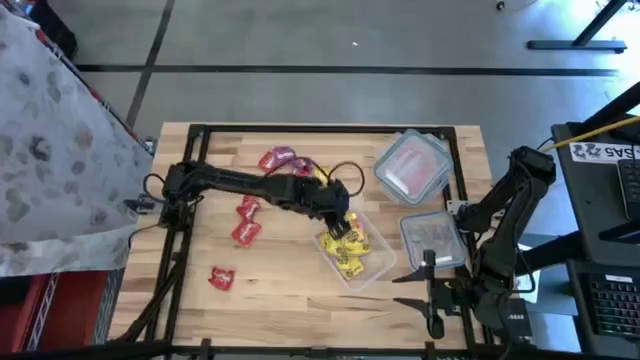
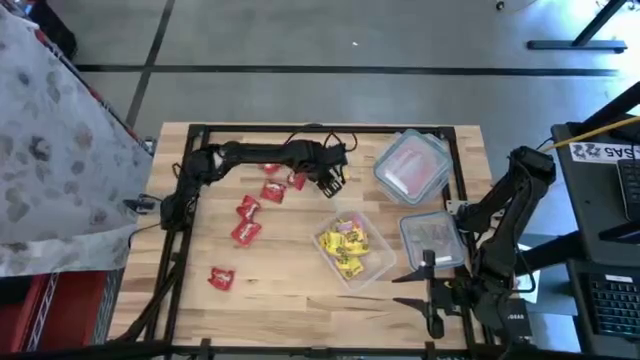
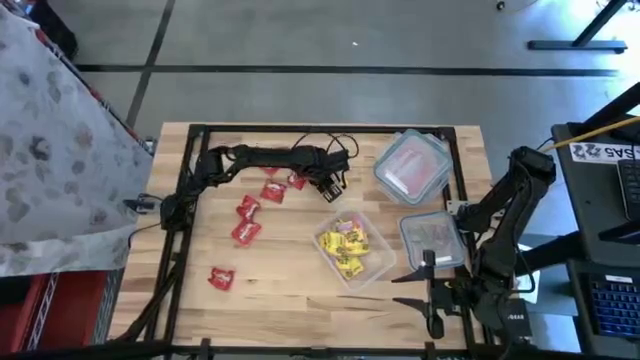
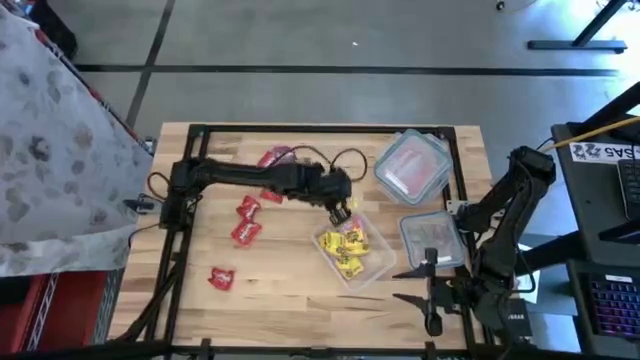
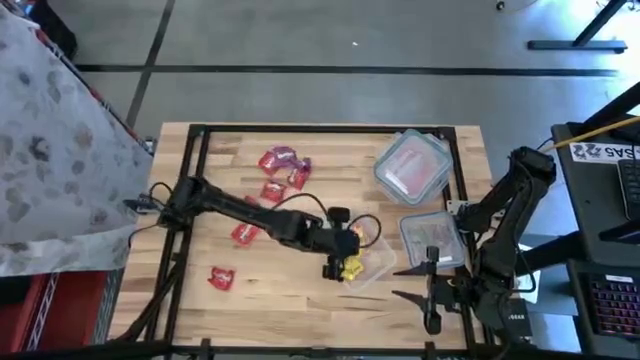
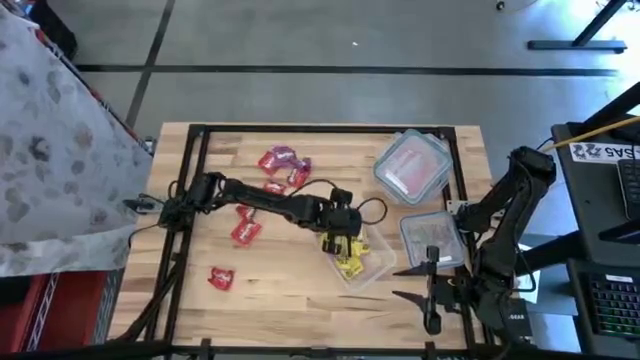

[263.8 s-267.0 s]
Task: Sort candy
Put the yellow candy into the rectangular transparent food container

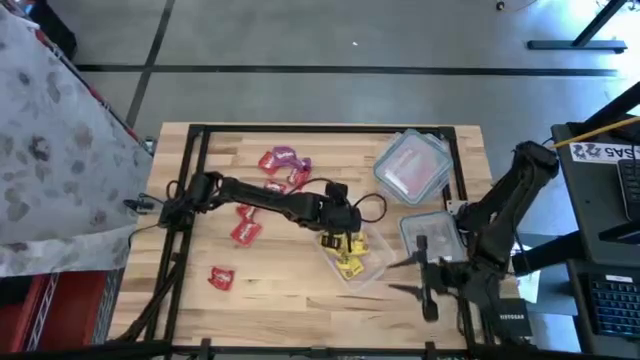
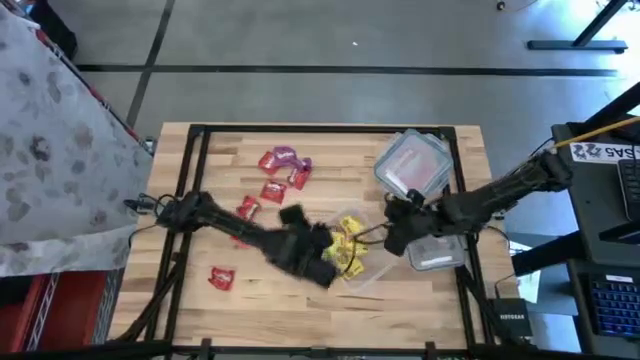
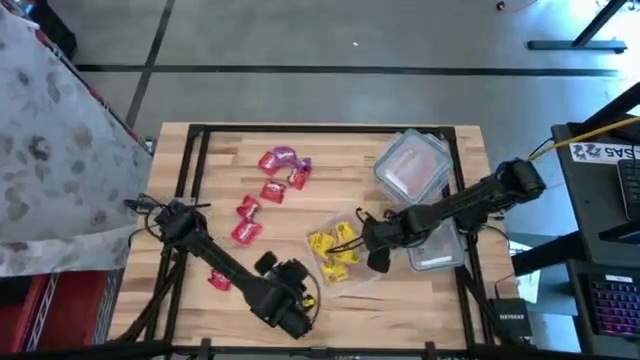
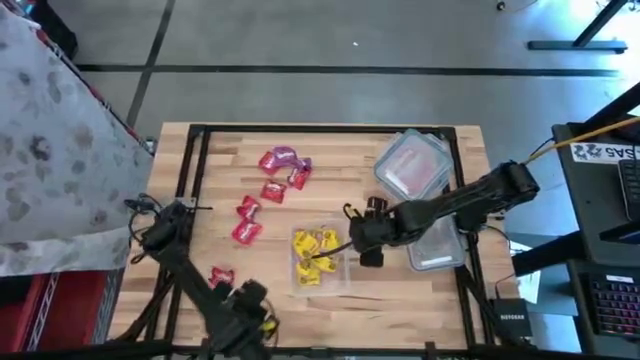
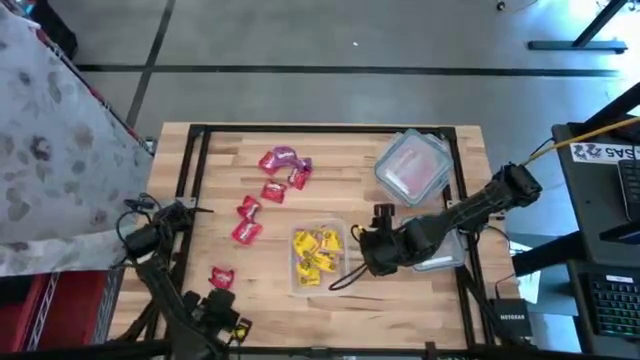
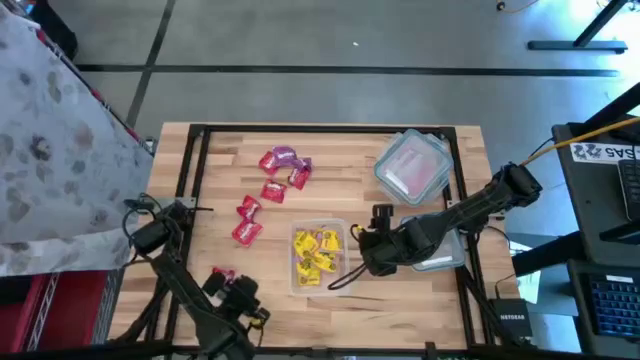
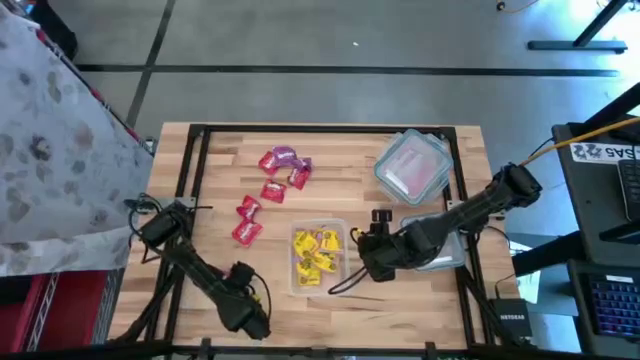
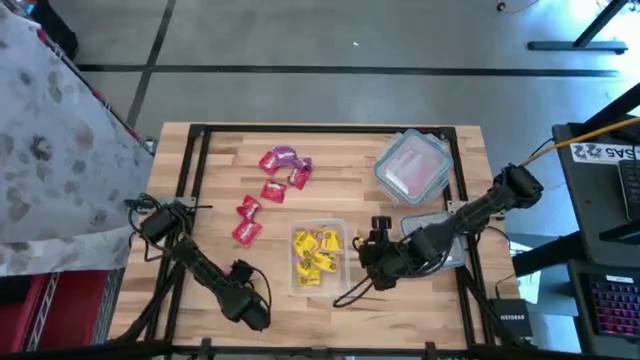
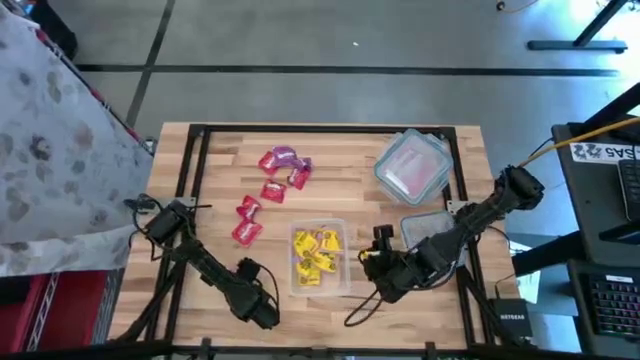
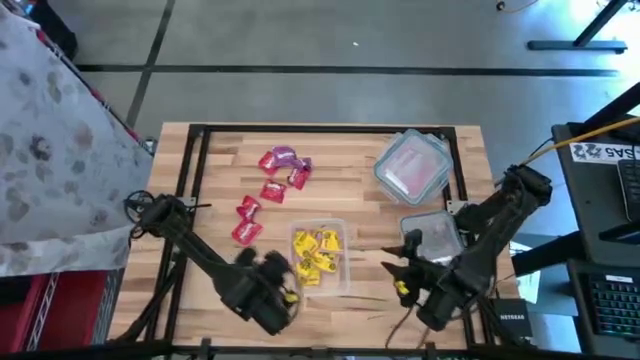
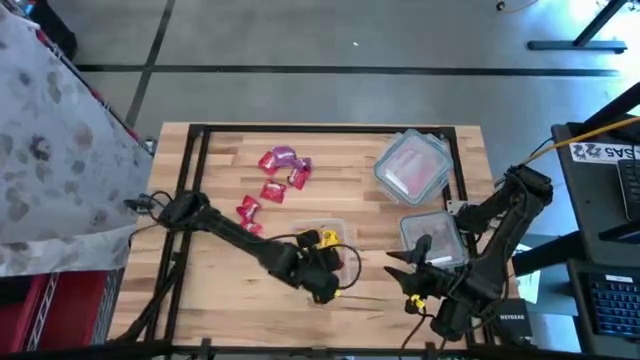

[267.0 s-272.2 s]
Put the red candy into the rectangular transparent food container

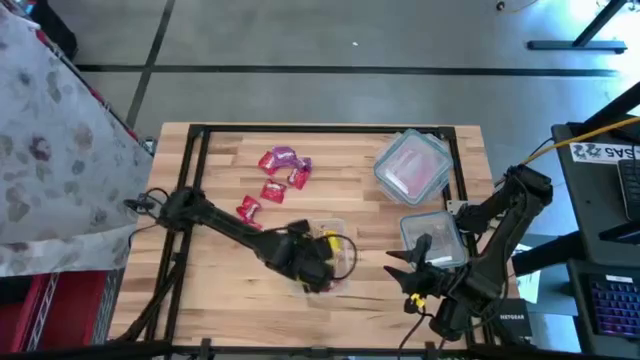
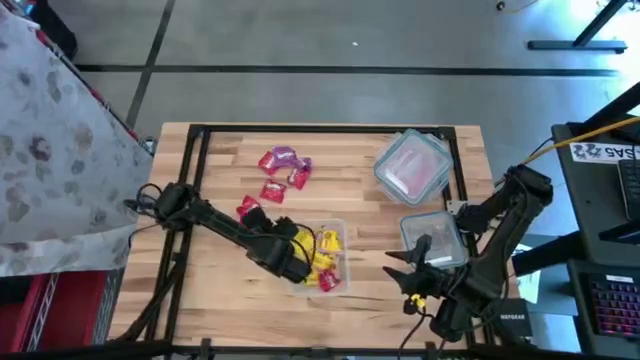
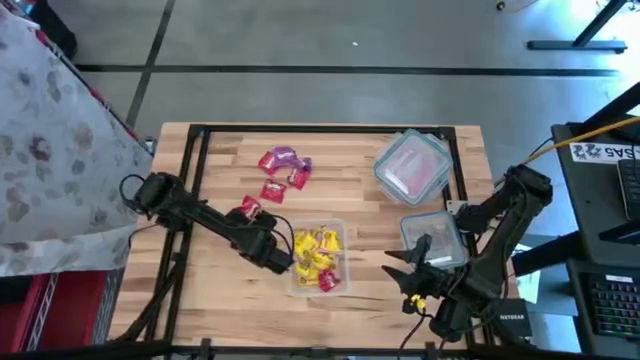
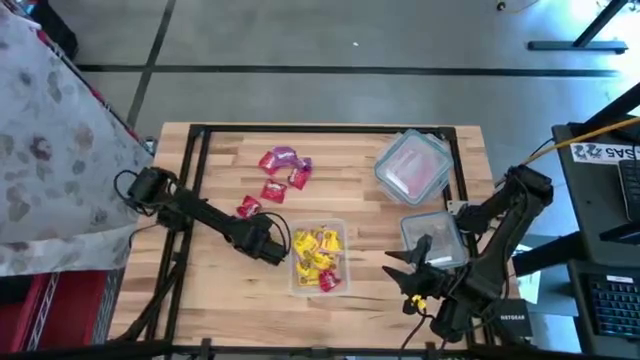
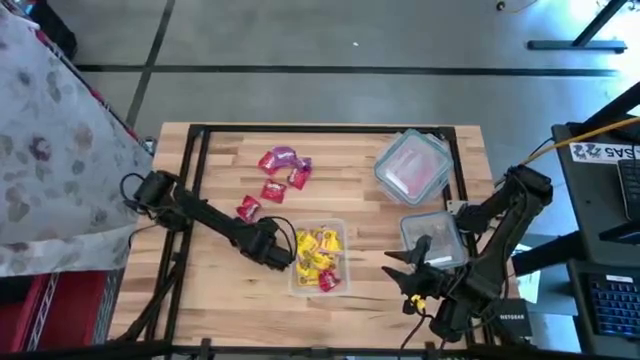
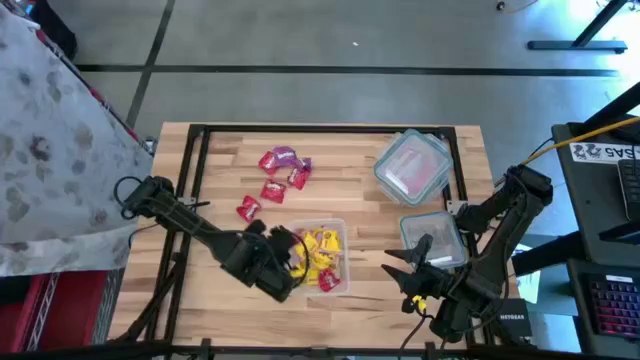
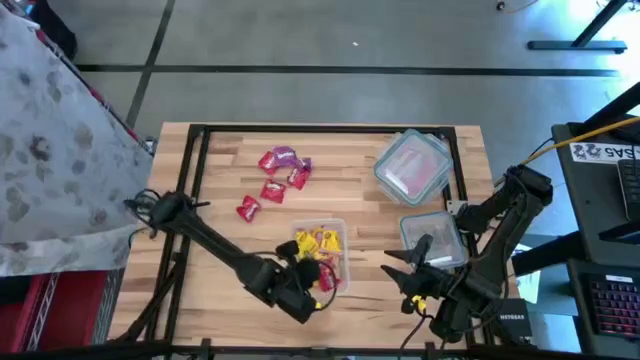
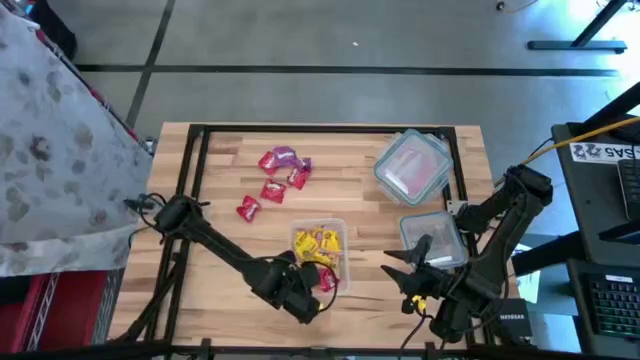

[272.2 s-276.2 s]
Put the red candy into the rectangular transparent food container

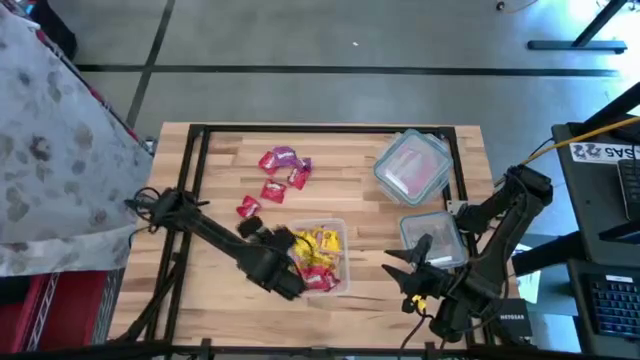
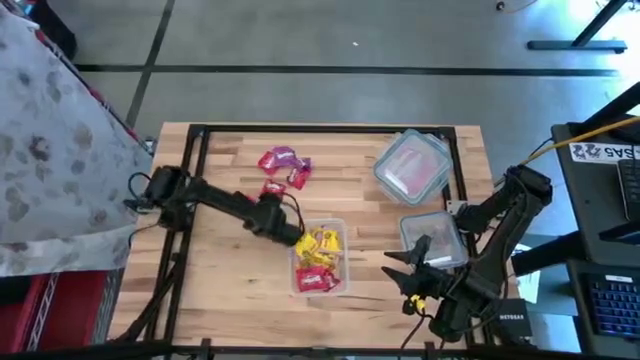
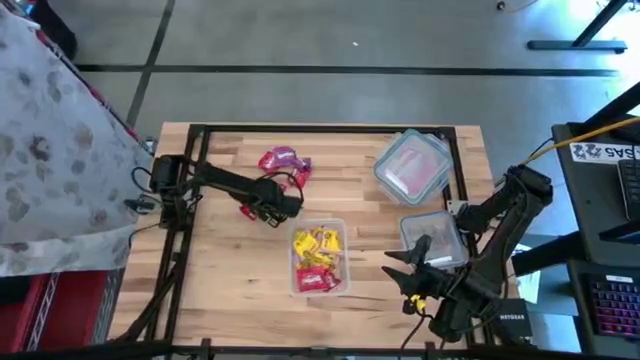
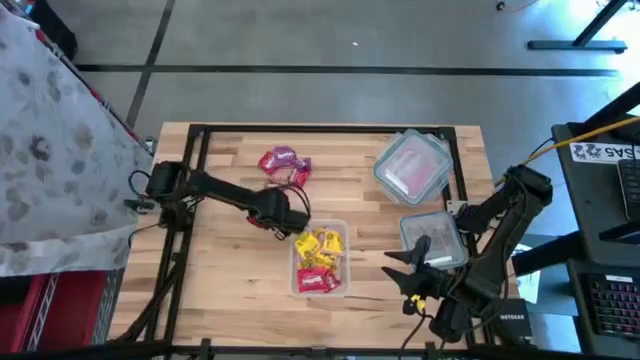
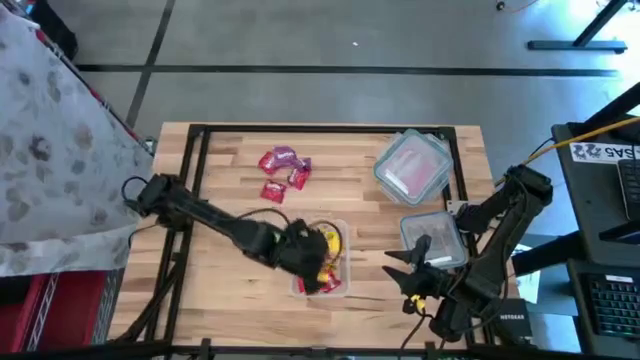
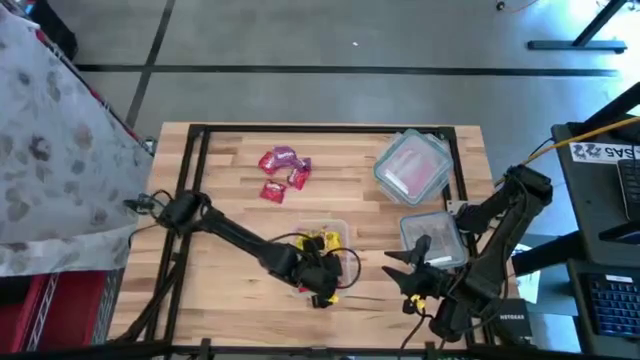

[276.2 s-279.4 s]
Put the red candy into the rectangular transparent food container

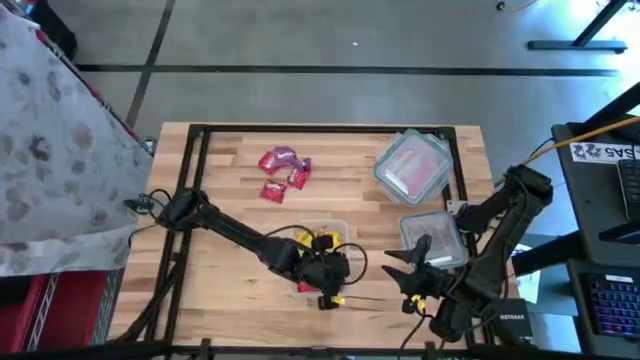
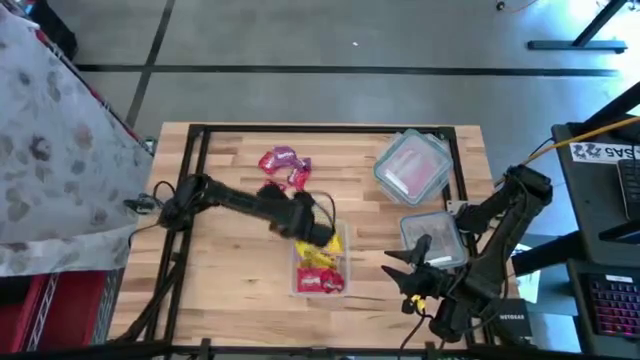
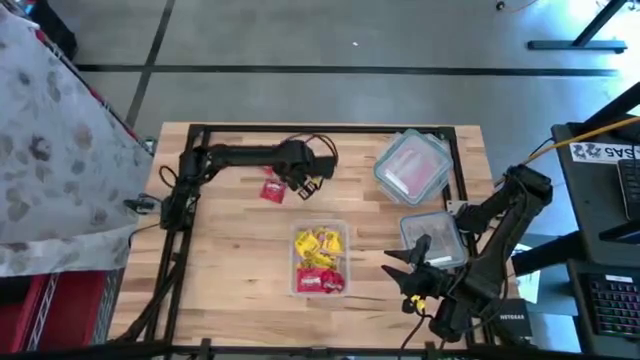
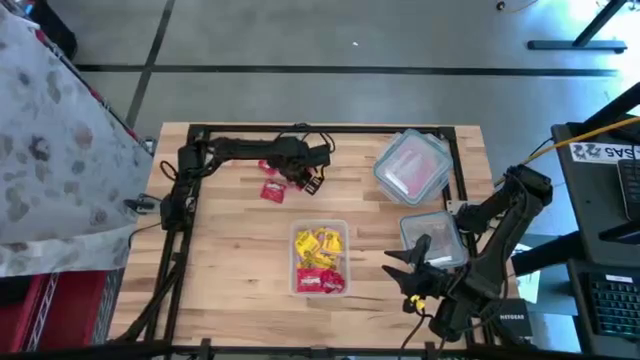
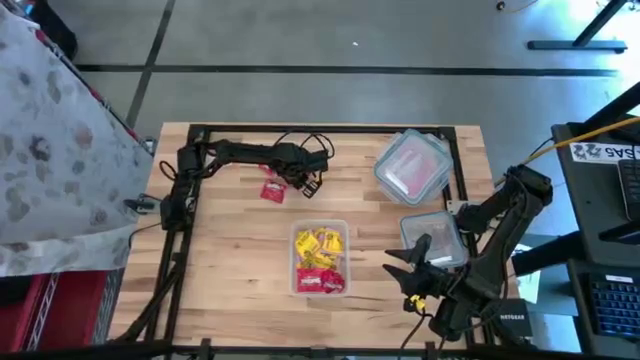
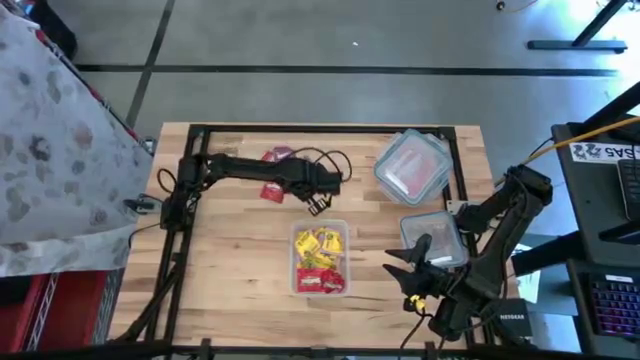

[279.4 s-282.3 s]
Put the red candy into the rectangular transparent food container

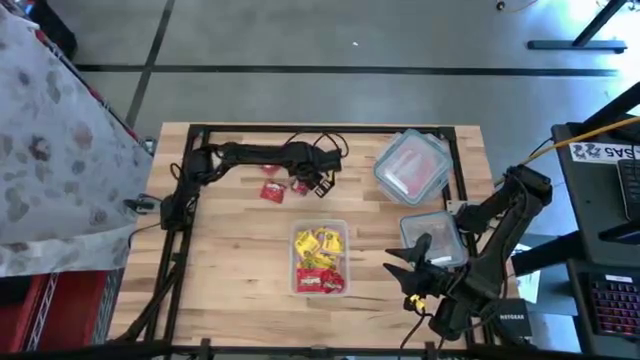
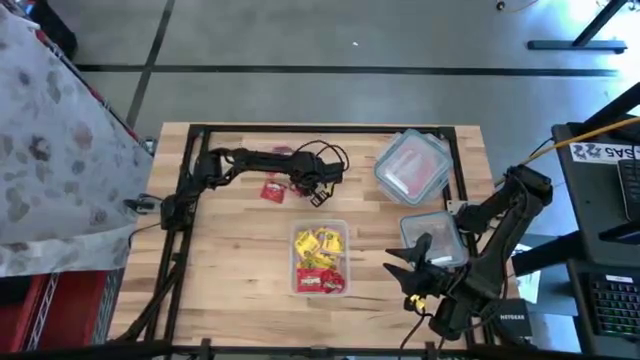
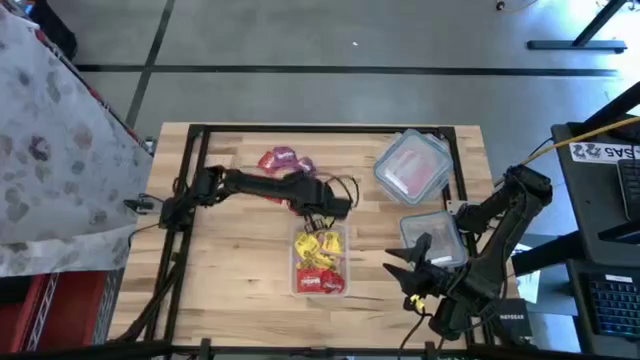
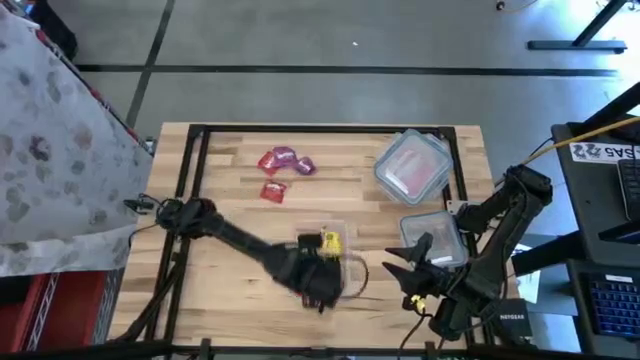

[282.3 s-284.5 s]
Put the red candy into the rectangular transparent food container

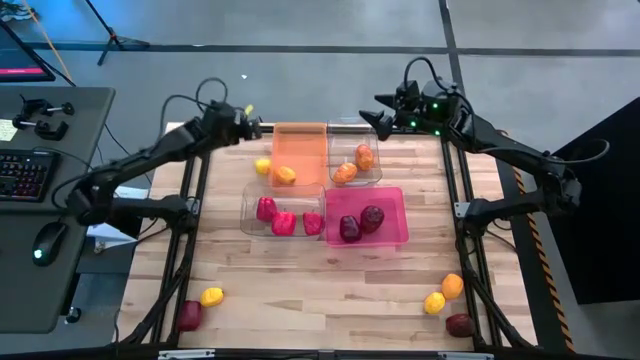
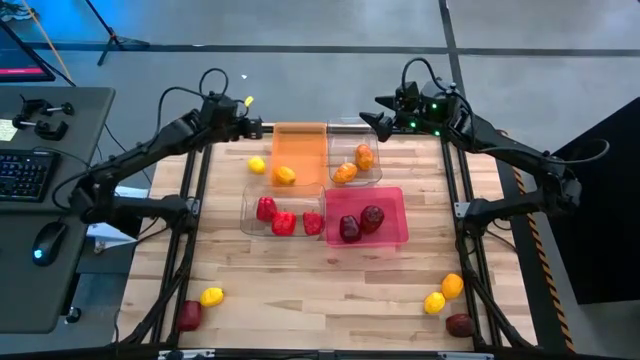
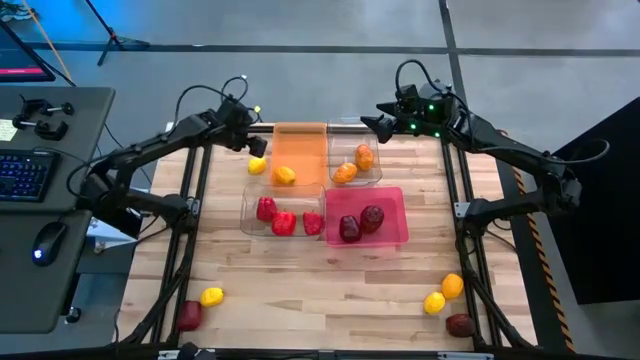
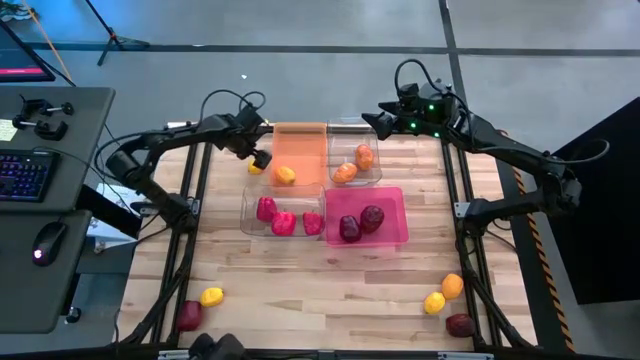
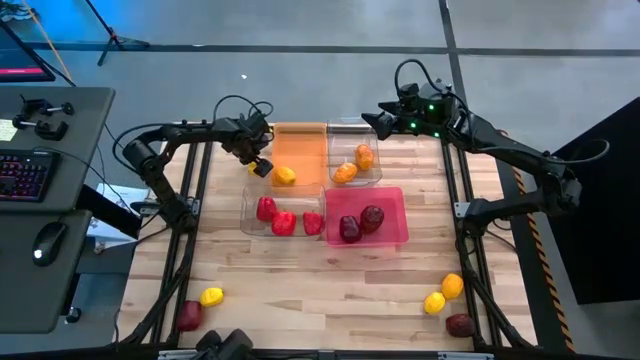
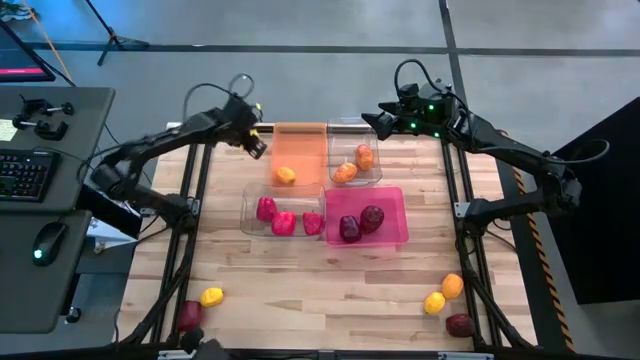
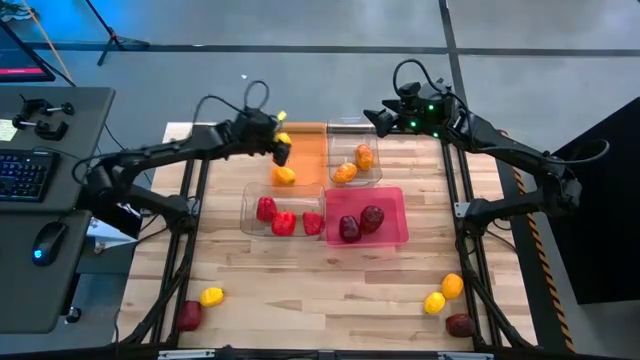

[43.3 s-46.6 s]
Task: Sort produce into baskets
Put the lemon into the orange bin
